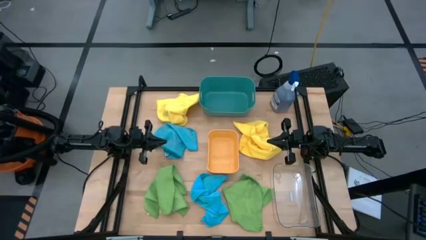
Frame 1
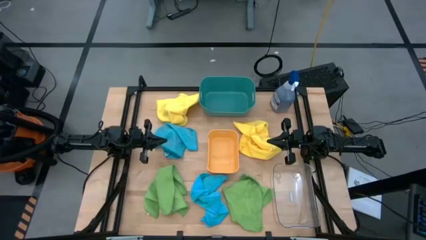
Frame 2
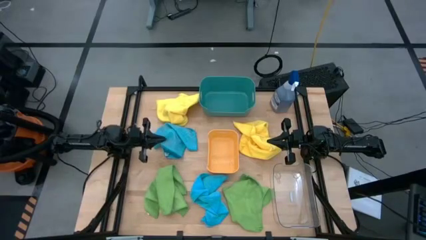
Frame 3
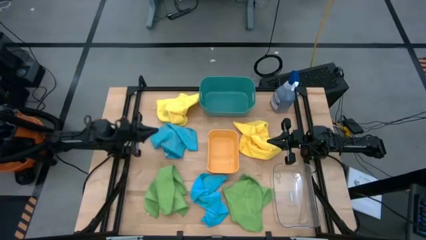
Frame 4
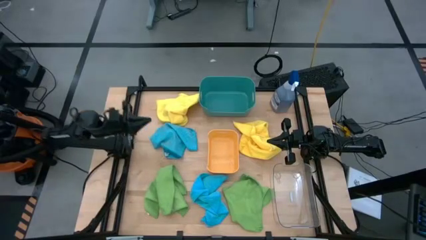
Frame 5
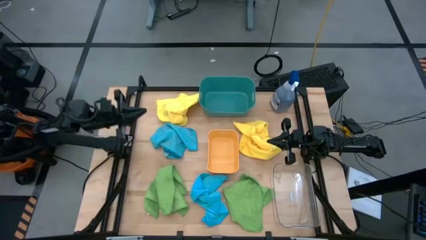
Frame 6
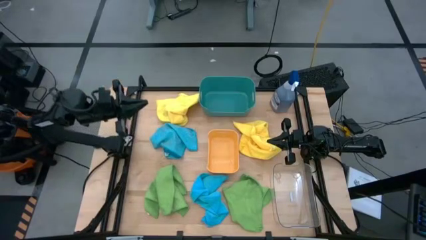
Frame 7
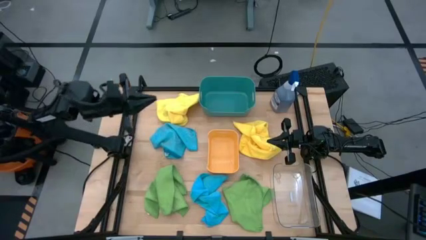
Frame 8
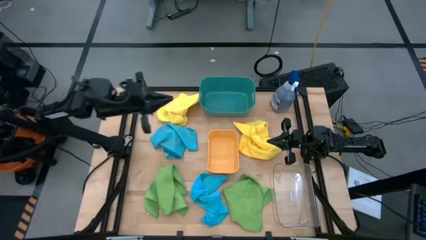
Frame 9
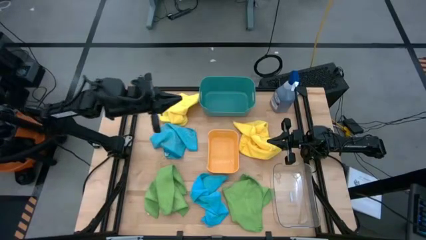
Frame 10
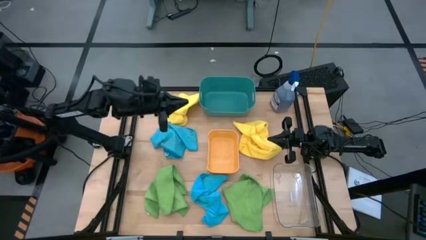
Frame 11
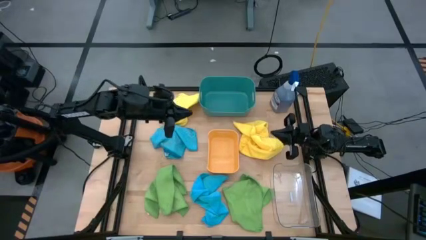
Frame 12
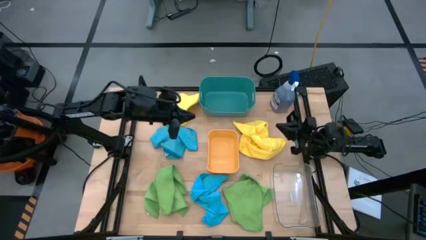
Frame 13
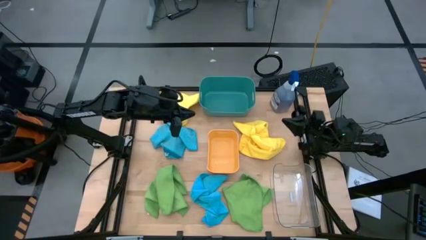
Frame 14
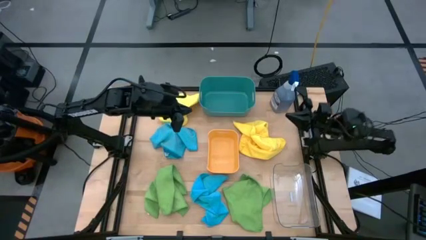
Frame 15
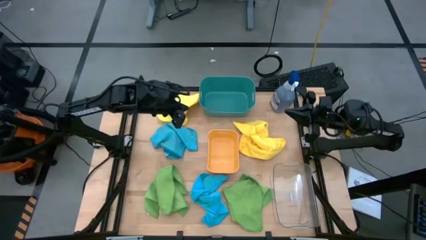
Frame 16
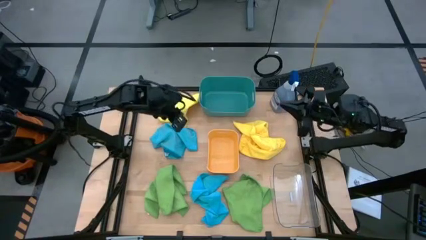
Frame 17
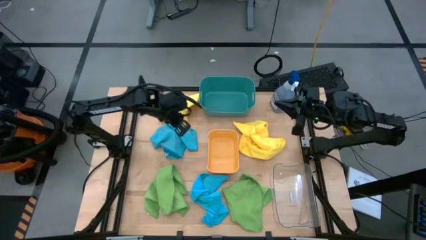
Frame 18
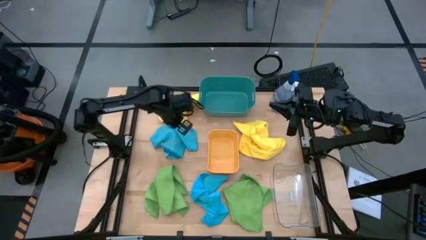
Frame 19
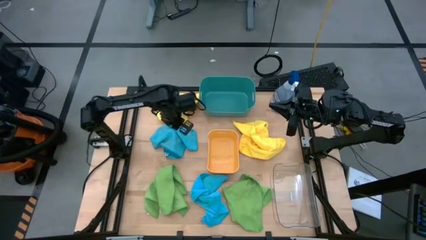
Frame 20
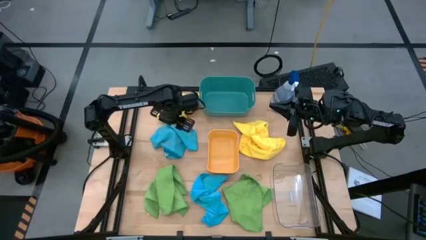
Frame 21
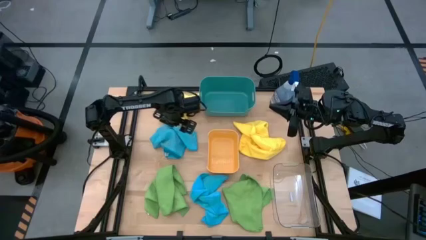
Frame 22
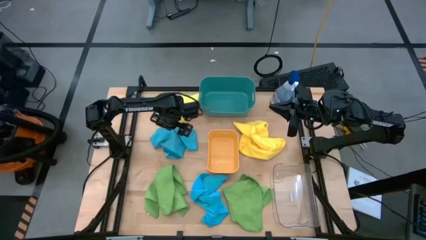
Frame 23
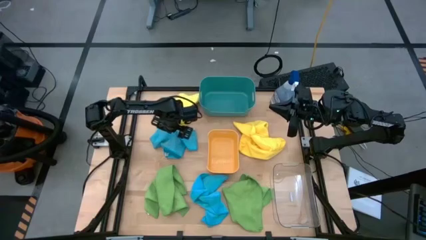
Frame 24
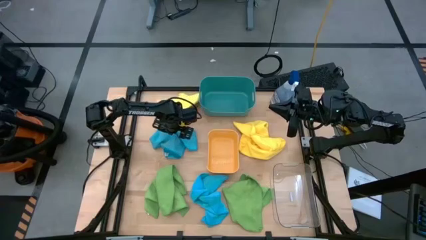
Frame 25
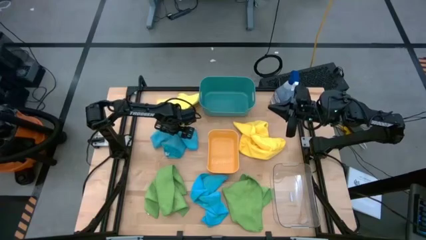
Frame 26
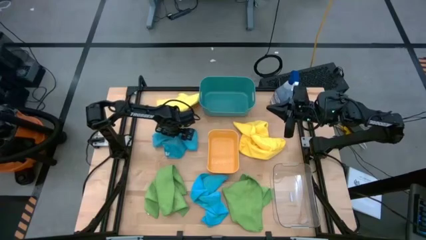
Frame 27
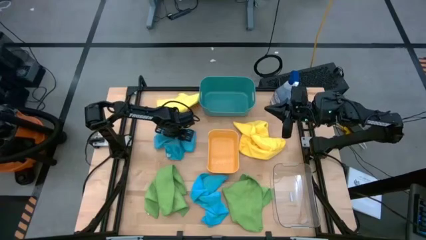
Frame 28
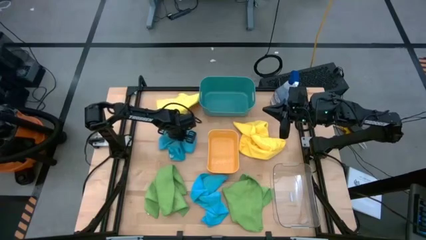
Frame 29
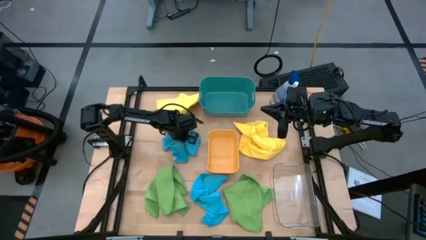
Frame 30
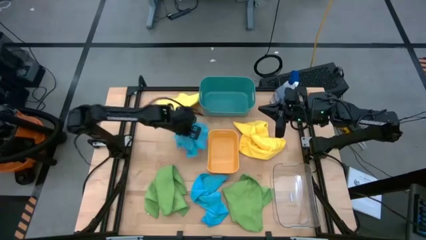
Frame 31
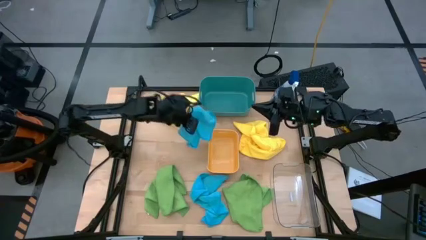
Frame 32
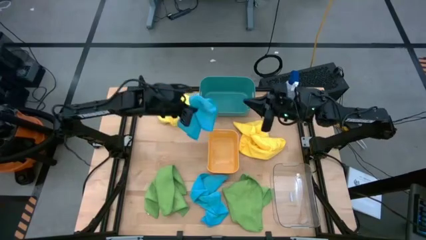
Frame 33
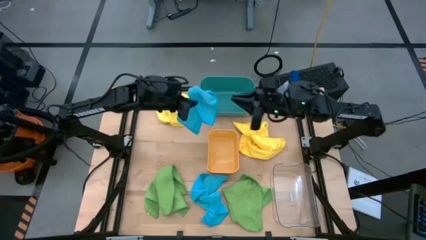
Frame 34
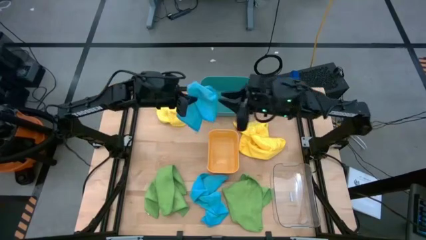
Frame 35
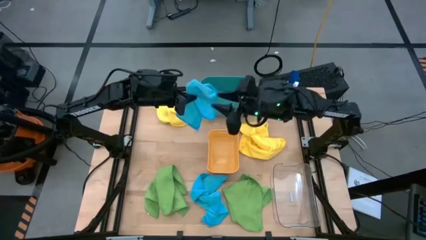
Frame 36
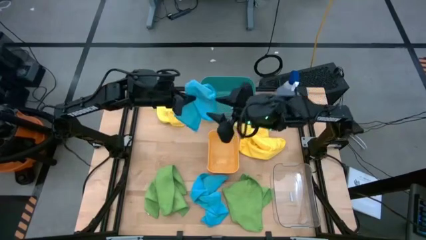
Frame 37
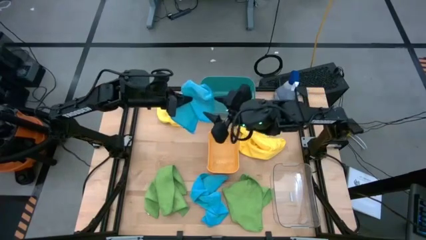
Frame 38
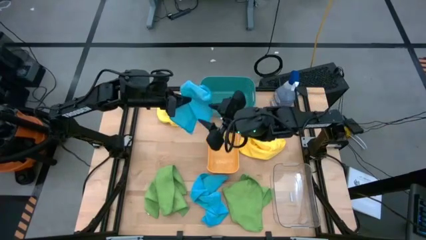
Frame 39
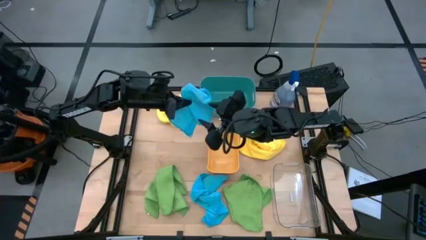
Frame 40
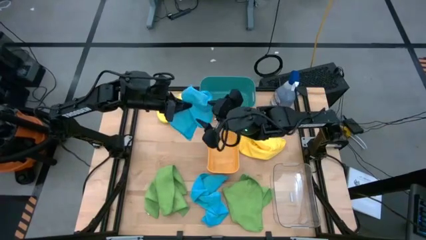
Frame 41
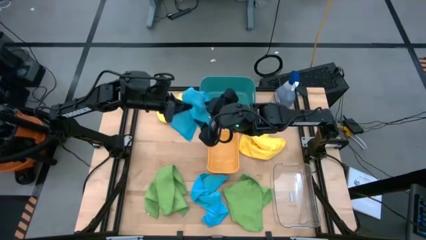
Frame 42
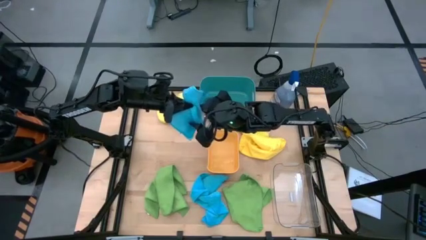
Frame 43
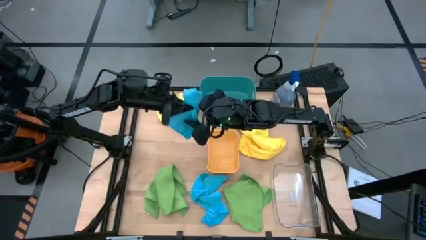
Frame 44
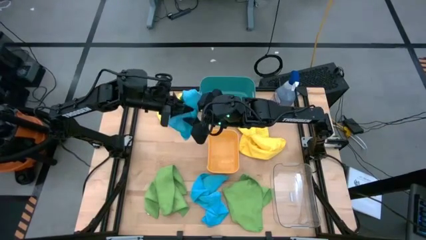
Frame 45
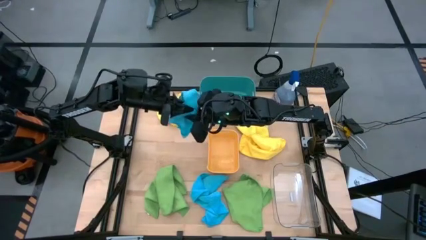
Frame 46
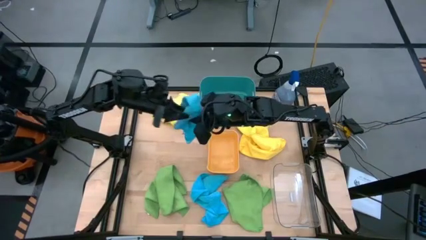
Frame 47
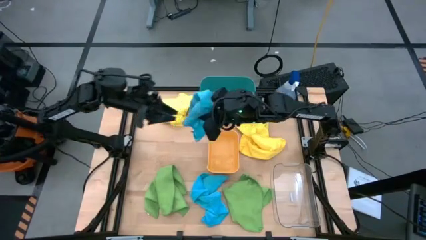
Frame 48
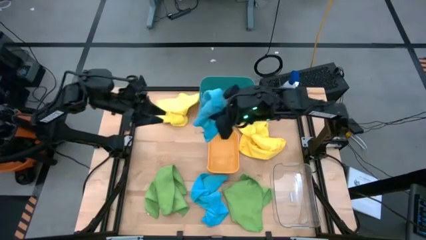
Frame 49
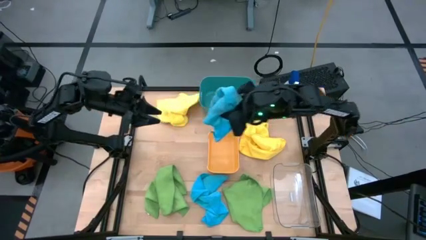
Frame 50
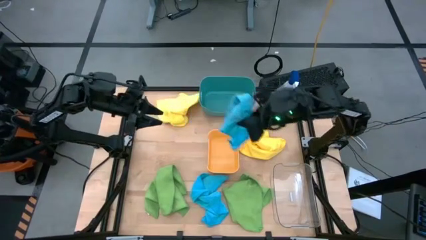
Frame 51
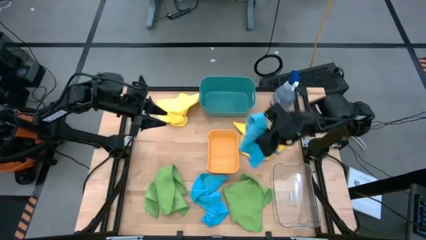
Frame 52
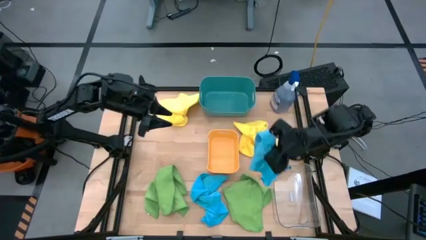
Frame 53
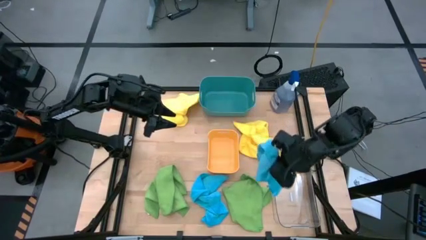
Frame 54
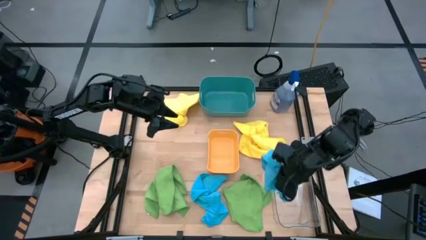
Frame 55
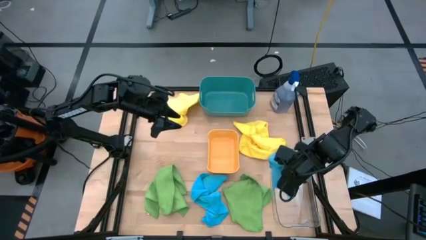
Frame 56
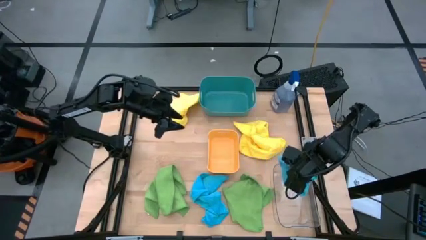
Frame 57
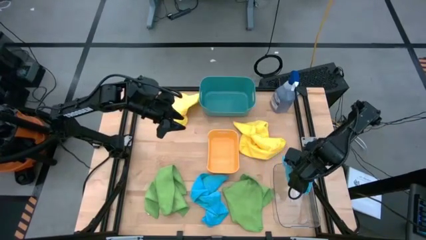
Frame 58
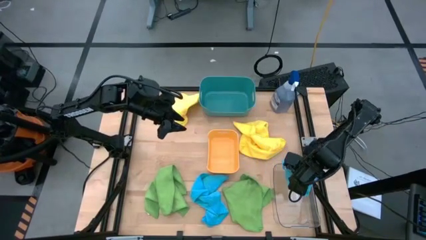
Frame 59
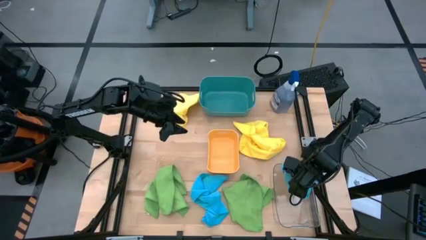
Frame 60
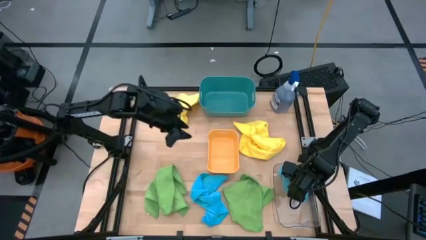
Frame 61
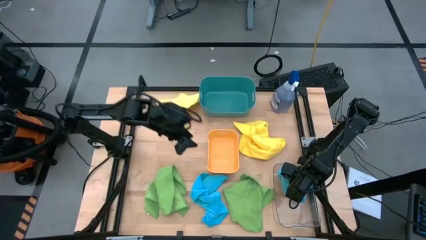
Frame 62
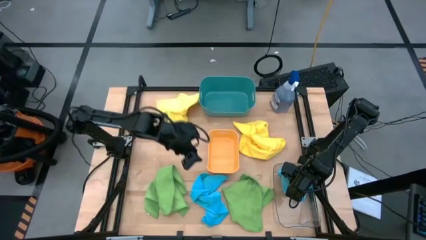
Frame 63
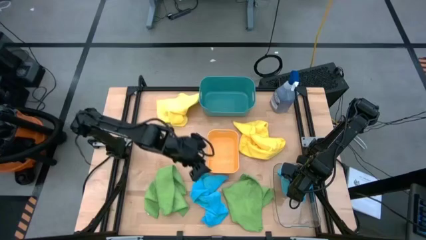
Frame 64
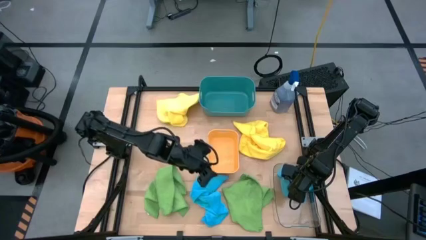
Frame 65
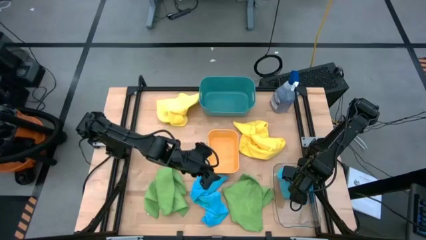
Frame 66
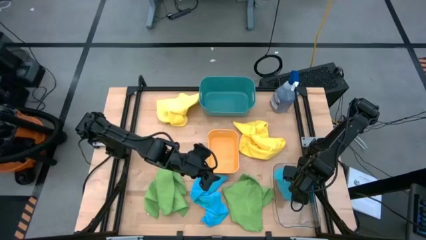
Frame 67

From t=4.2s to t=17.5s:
Task: Sort microfiber towel by color & place in baskets
Put the top blue microfiber towel into the transparent bin
